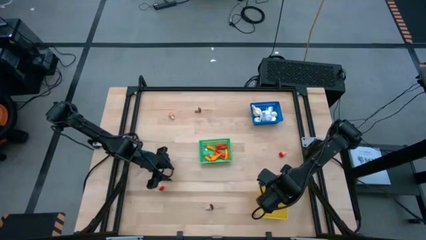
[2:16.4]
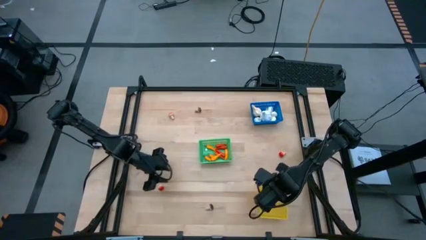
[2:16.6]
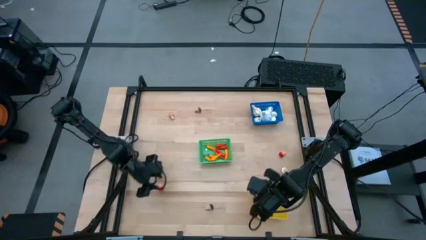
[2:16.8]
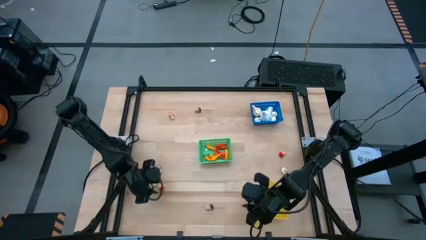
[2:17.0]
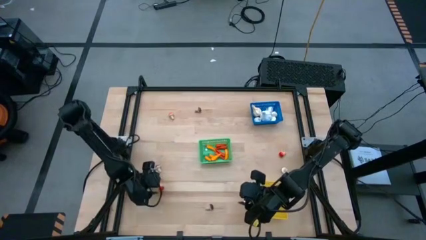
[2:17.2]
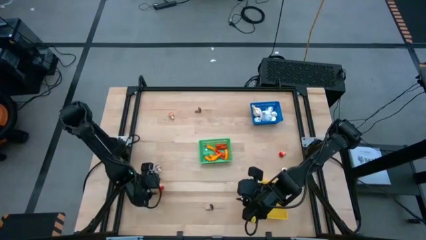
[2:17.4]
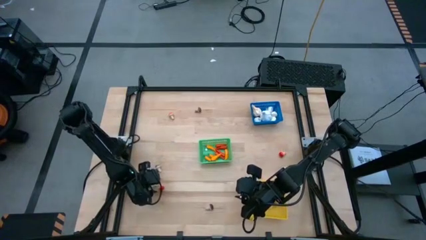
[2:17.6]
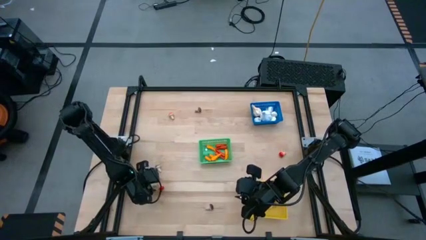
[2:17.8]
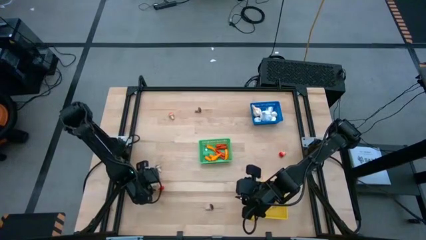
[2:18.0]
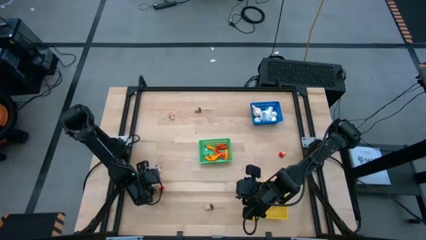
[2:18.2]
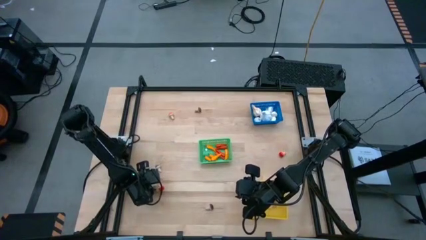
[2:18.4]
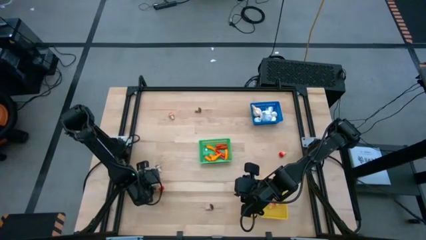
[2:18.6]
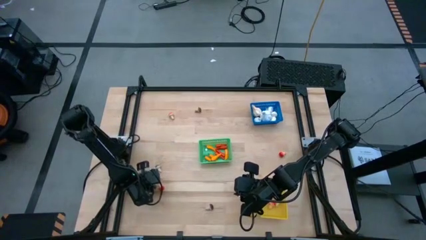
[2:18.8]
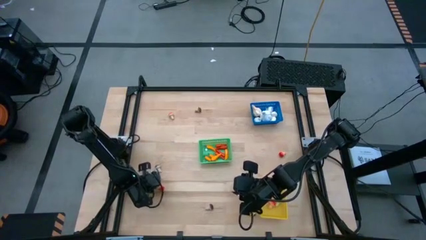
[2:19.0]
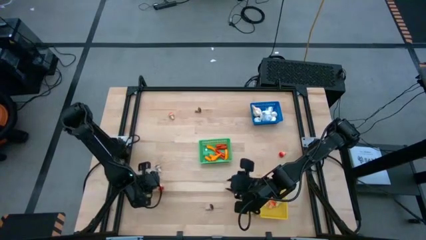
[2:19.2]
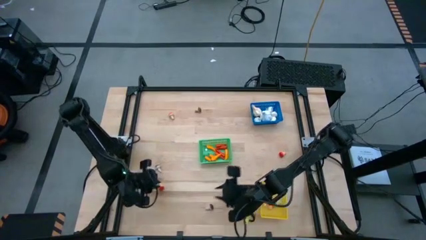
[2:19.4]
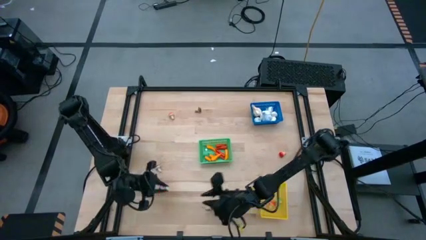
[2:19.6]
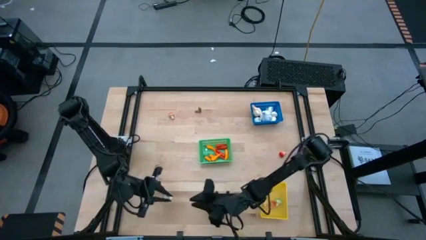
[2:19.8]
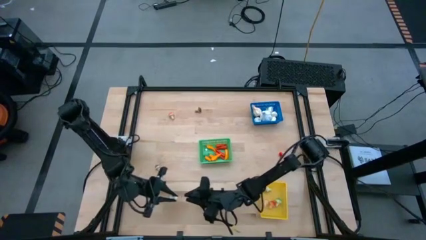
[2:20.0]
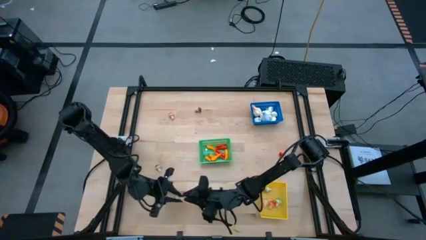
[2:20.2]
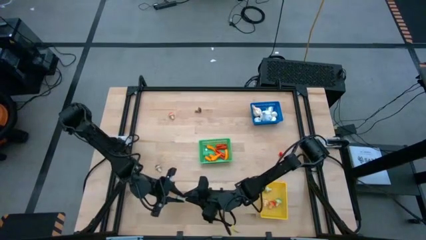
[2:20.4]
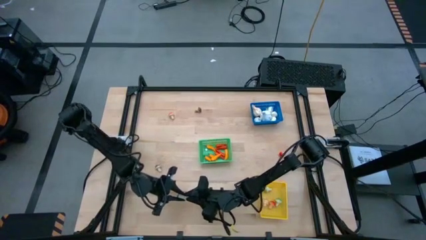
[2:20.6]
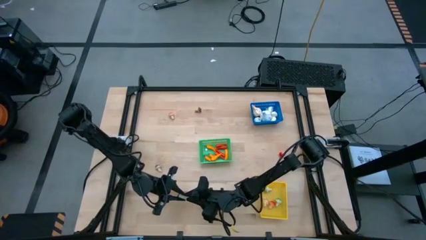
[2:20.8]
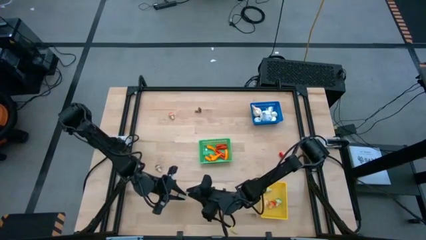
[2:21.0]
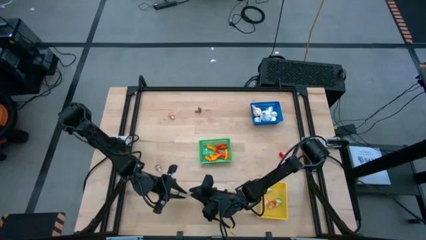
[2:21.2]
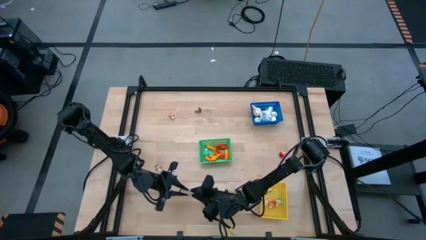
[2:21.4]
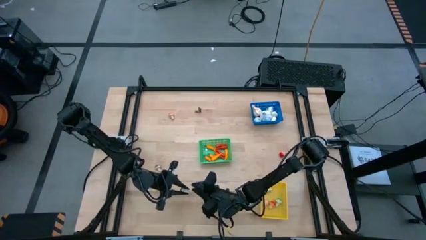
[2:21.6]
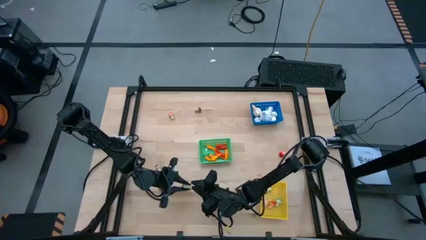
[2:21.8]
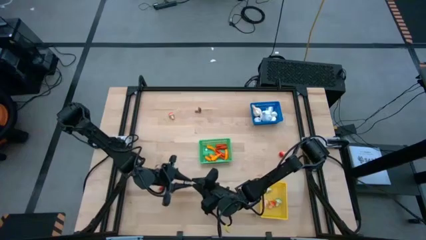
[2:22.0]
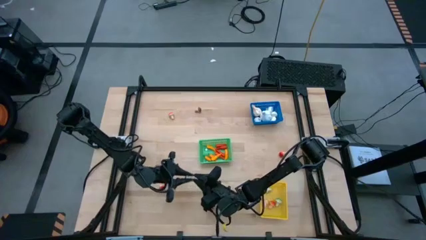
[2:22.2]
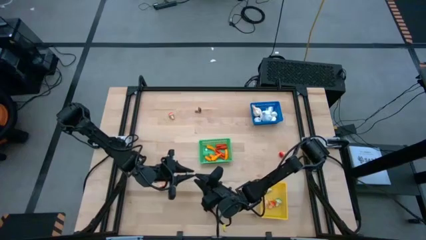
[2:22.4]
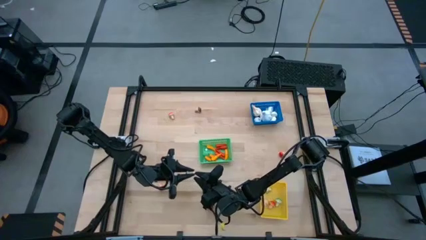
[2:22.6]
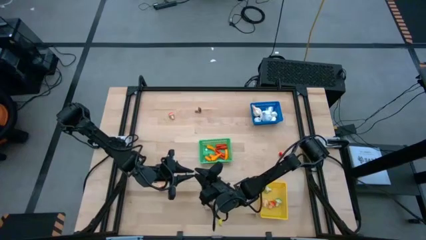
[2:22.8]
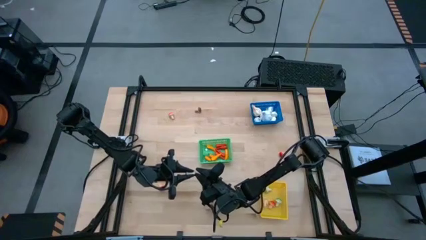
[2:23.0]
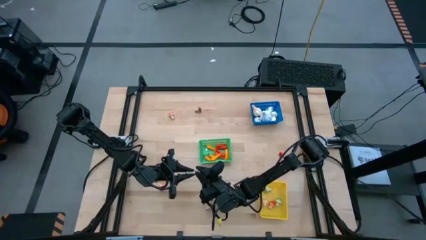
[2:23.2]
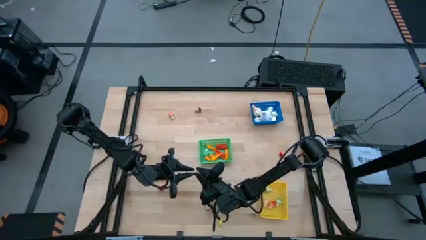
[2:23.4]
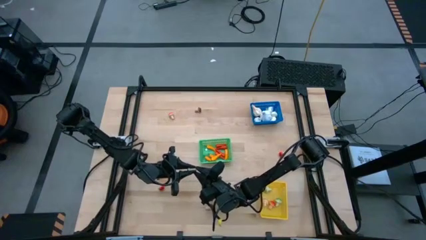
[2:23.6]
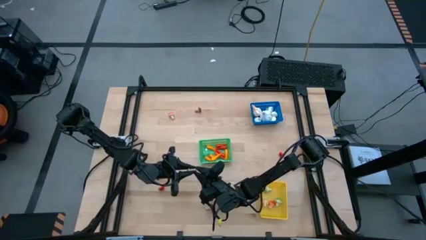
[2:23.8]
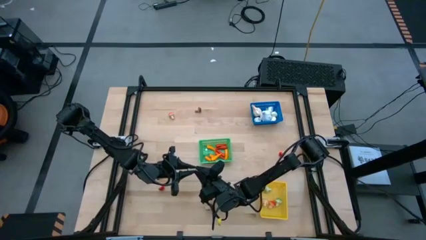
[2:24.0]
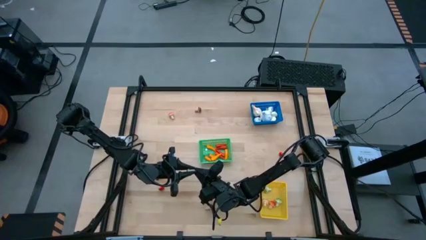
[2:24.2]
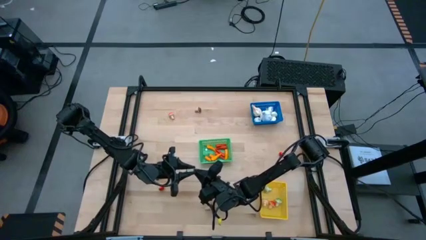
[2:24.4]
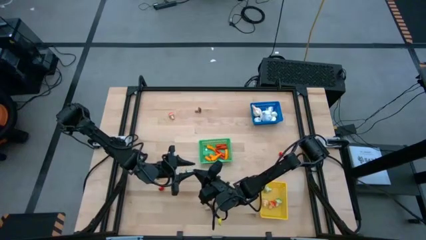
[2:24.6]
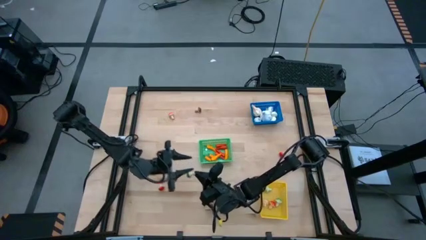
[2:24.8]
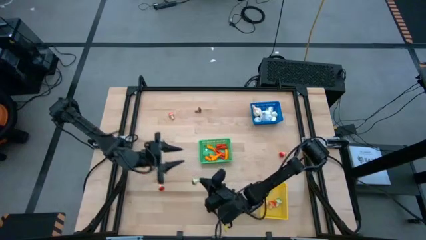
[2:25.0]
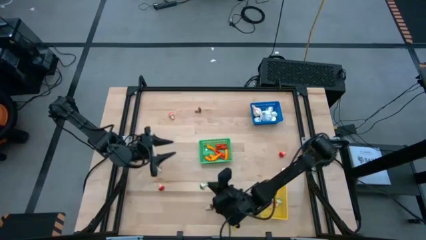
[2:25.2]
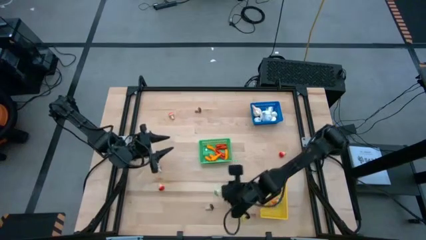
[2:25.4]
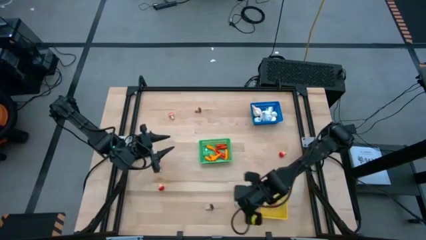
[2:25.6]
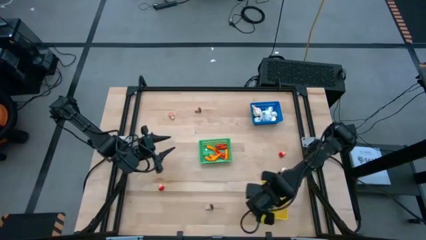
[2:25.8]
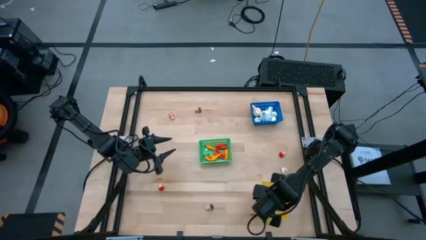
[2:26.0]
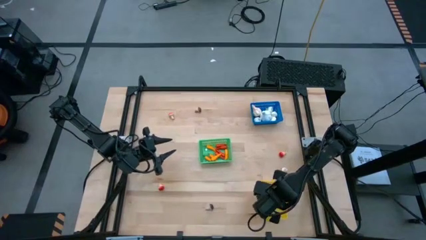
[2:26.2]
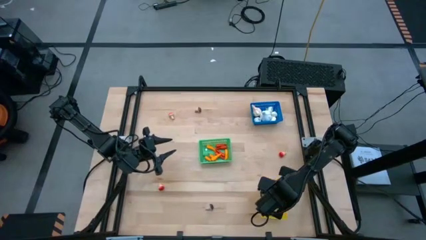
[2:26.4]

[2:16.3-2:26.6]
Task: Sort produce into baskets
Put the green mushroom into the yellow bin

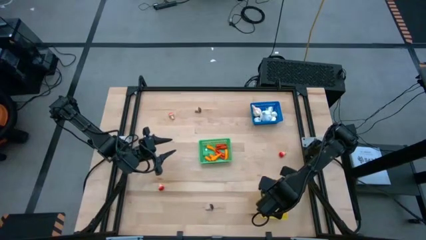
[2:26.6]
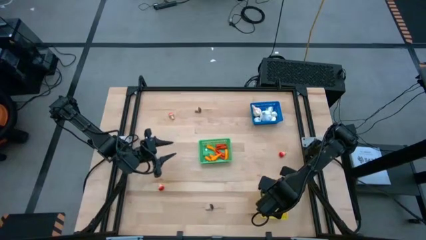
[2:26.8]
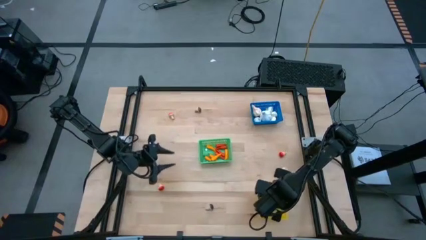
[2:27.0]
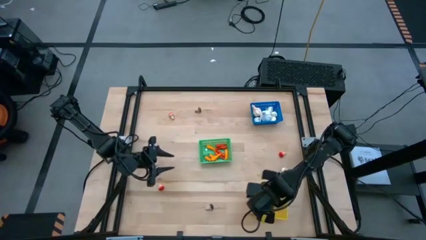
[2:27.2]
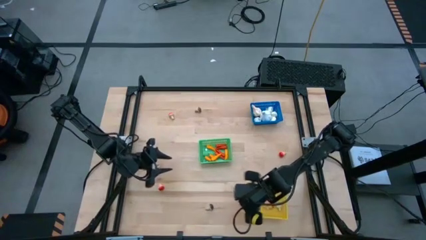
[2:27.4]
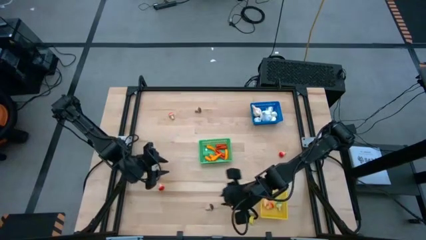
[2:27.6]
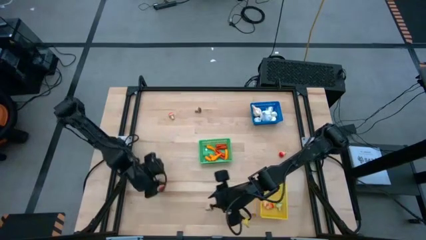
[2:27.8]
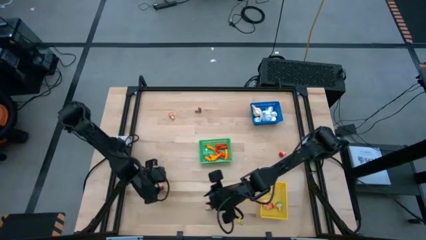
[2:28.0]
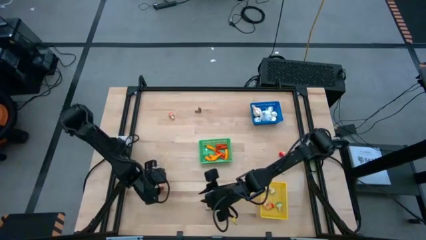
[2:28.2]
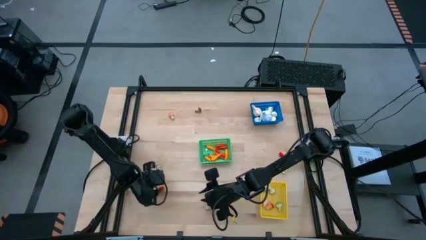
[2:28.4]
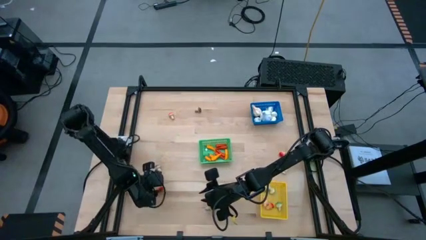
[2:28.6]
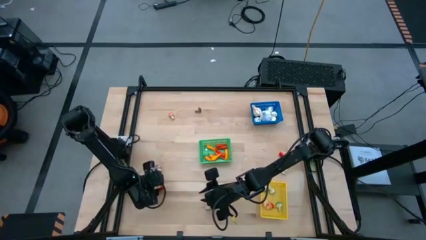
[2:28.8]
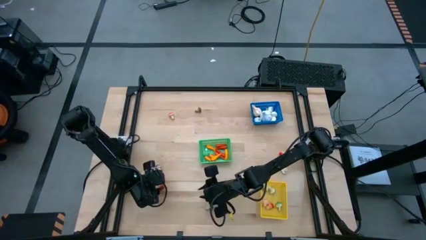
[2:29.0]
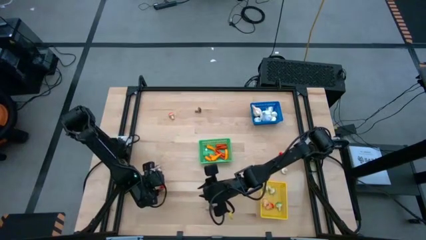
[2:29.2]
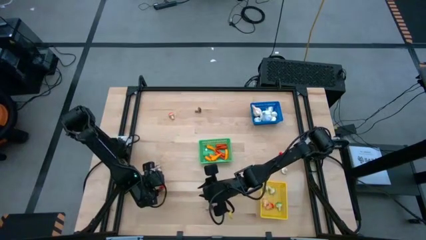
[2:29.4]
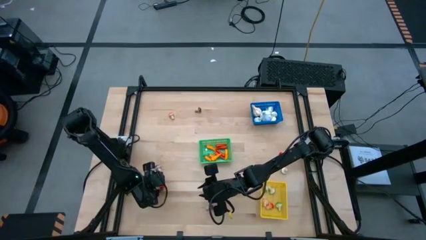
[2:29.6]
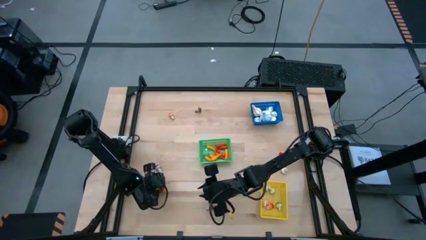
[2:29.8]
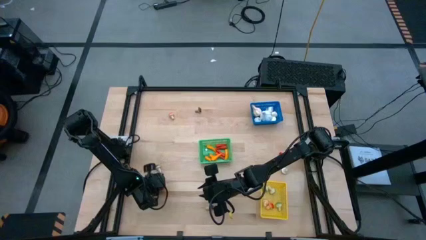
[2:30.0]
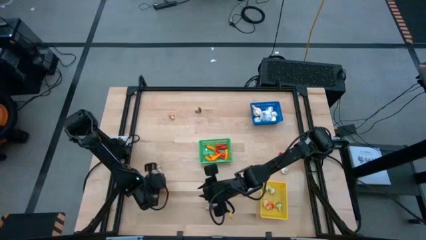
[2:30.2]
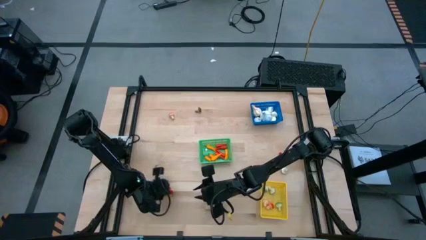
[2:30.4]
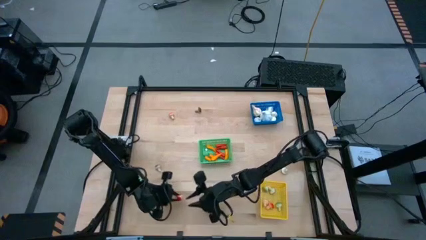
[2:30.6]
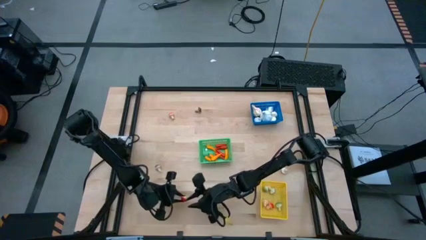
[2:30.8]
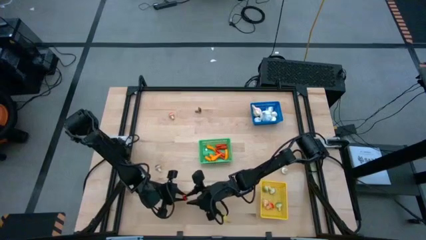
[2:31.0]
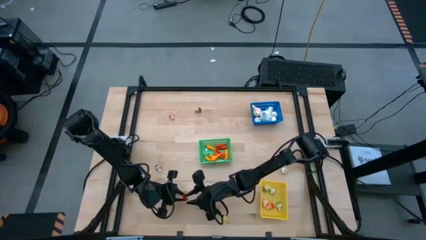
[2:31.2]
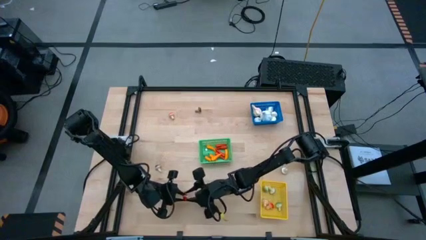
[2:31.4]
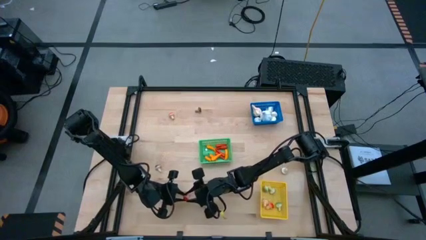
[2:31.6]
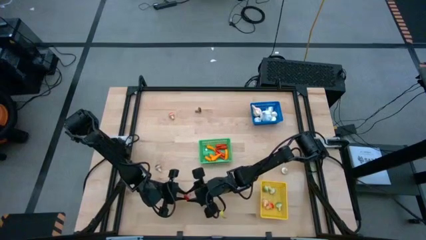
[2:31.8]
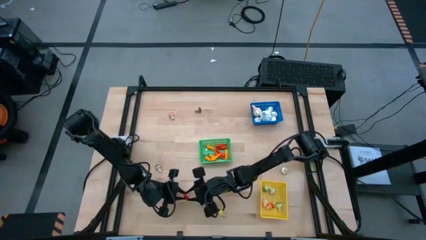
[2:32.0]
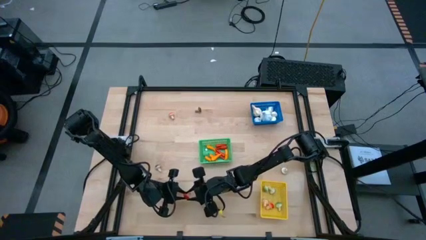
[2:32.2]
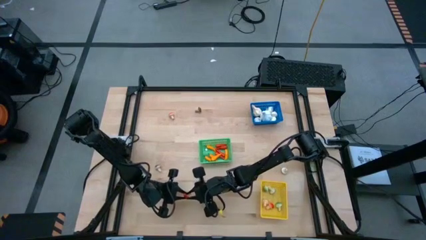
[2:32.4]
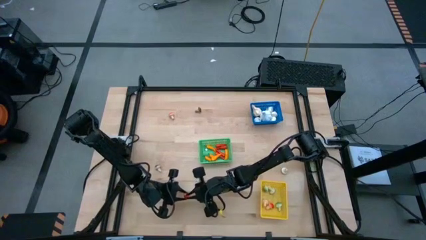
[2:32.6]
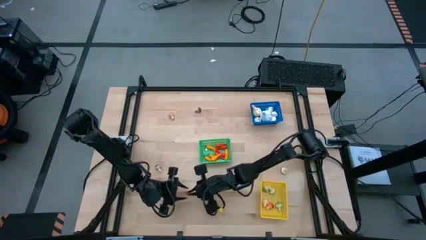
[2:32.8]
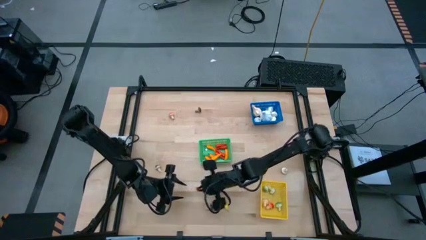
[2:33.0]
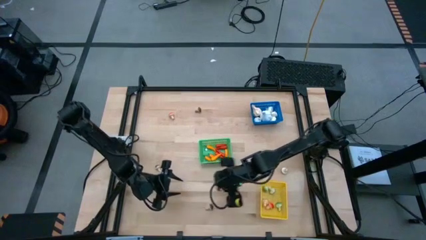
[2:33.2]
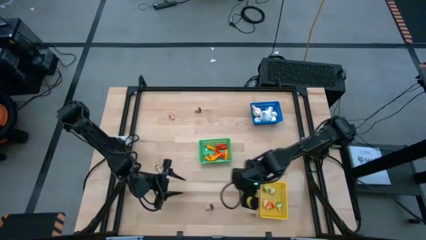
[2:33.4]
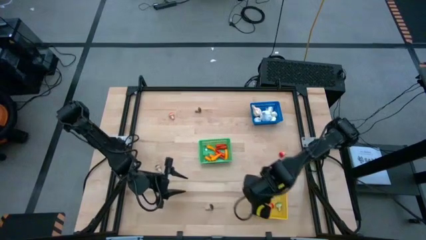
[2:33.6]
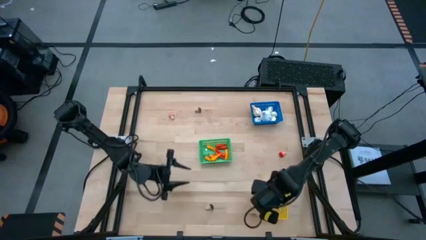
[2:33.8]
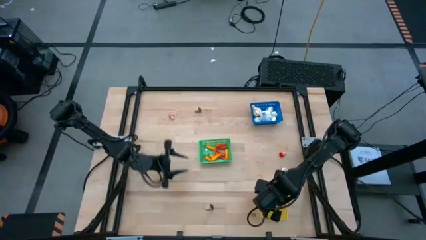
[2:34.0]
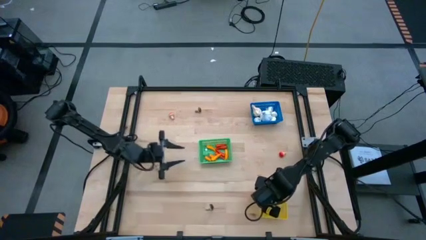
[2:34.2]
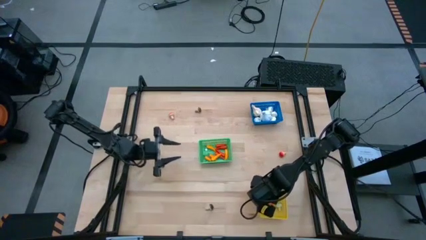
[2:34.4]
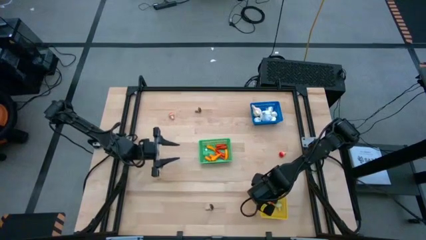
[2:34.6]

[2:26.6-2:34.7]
Put the orange mushroom into the yellow bin
